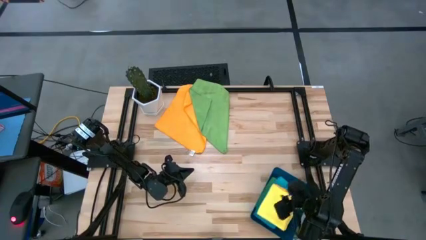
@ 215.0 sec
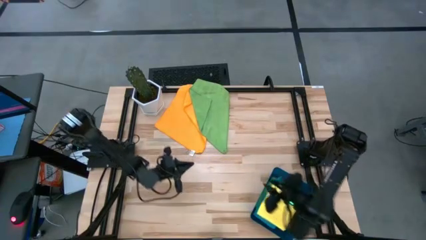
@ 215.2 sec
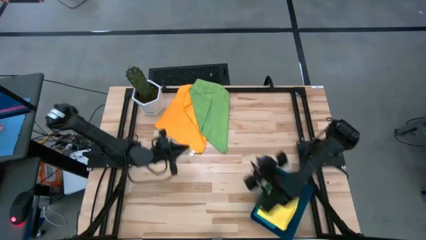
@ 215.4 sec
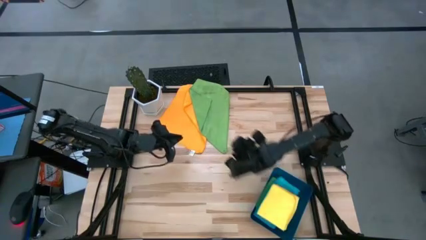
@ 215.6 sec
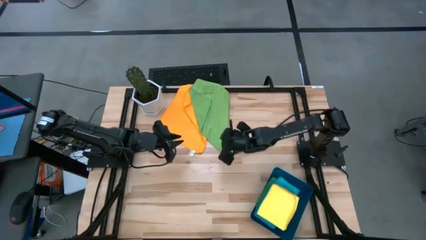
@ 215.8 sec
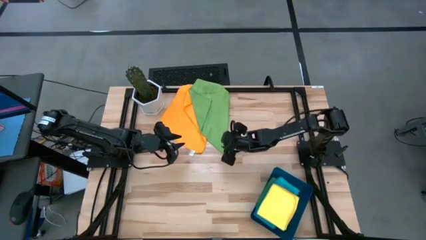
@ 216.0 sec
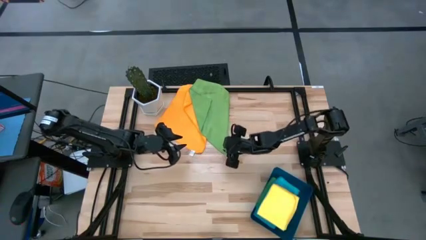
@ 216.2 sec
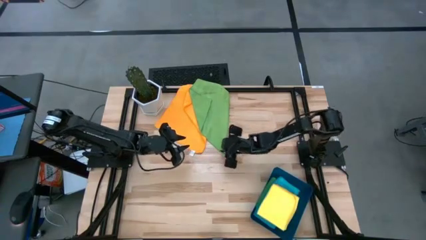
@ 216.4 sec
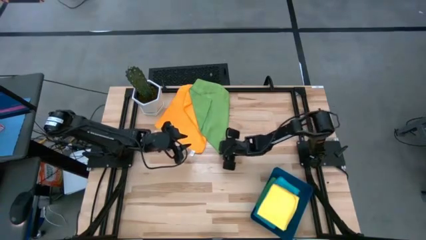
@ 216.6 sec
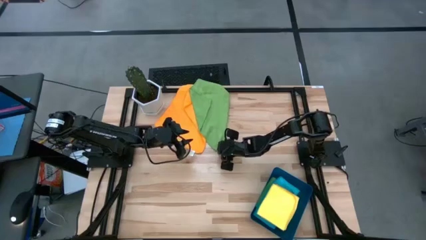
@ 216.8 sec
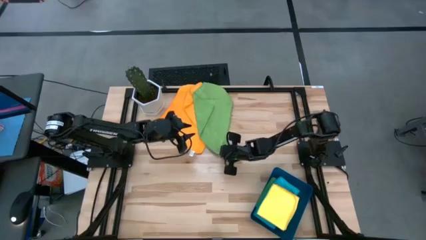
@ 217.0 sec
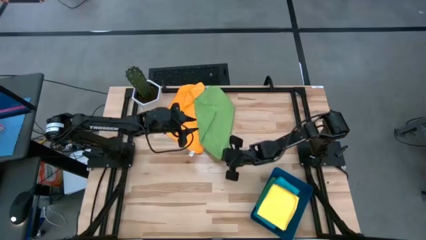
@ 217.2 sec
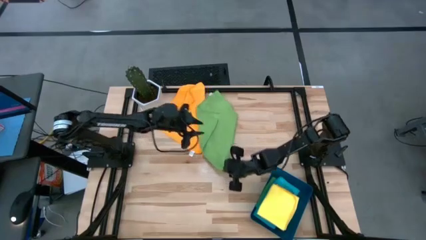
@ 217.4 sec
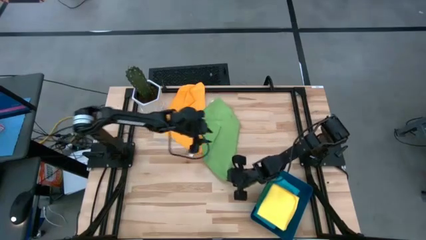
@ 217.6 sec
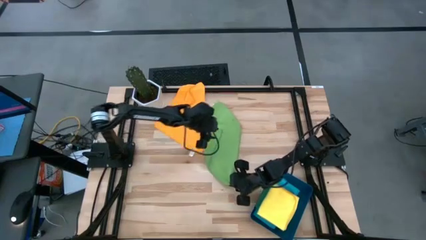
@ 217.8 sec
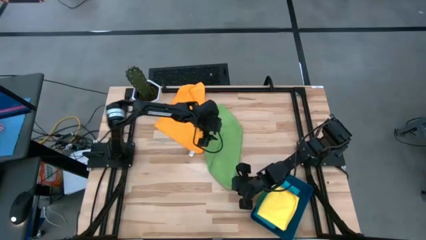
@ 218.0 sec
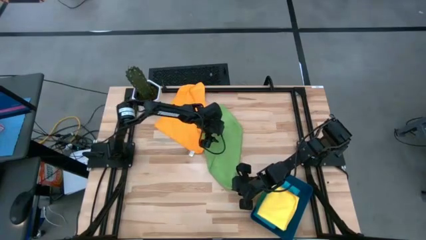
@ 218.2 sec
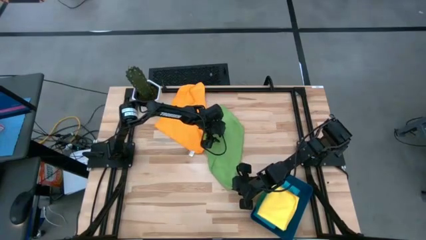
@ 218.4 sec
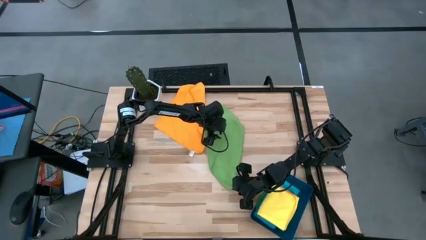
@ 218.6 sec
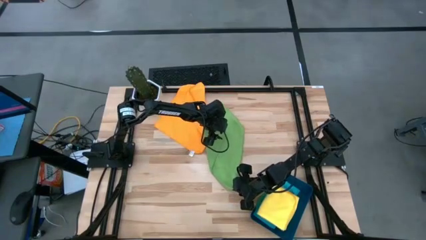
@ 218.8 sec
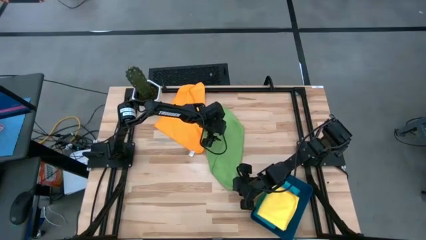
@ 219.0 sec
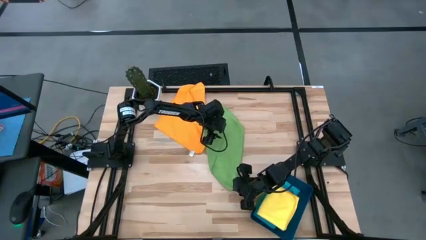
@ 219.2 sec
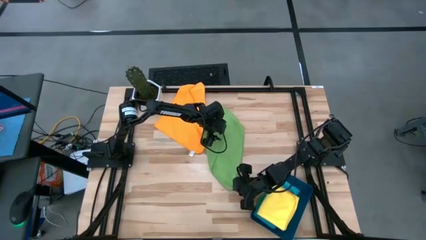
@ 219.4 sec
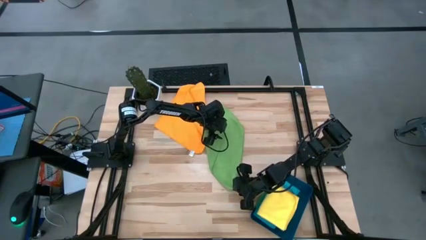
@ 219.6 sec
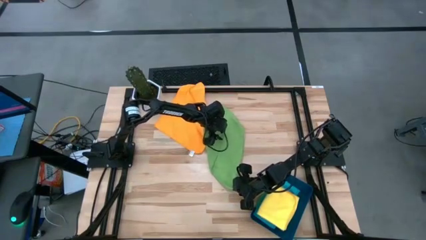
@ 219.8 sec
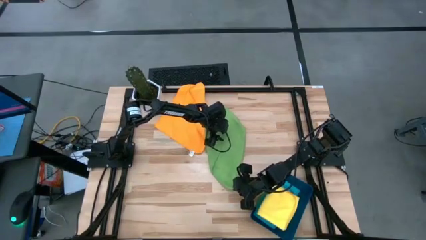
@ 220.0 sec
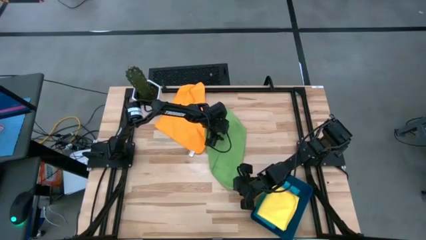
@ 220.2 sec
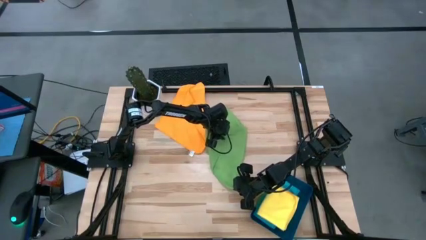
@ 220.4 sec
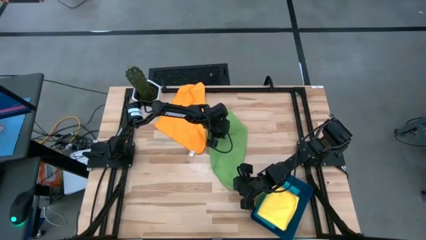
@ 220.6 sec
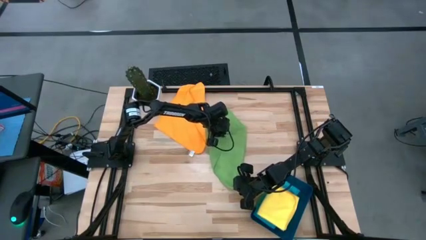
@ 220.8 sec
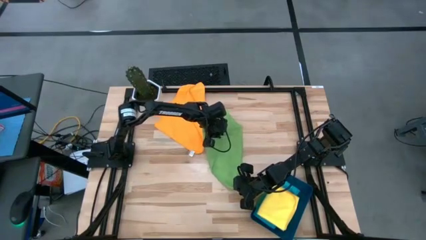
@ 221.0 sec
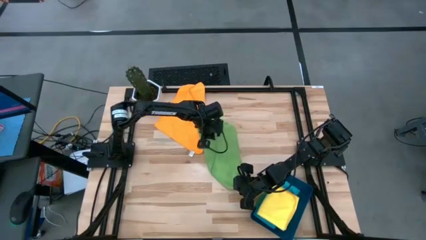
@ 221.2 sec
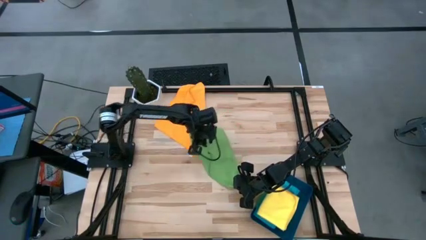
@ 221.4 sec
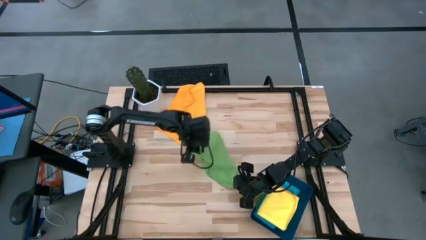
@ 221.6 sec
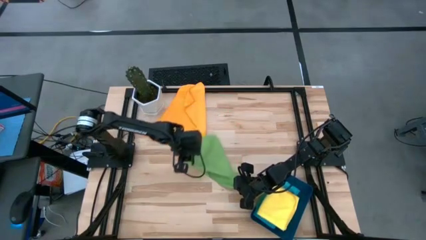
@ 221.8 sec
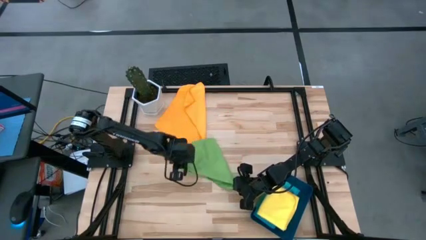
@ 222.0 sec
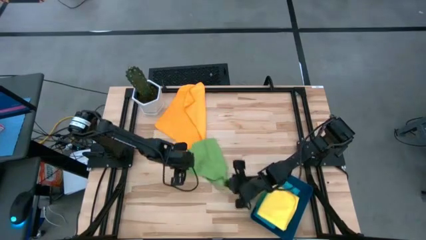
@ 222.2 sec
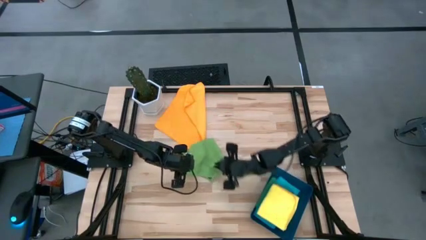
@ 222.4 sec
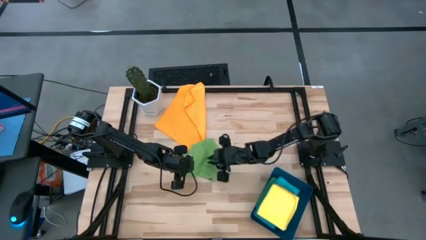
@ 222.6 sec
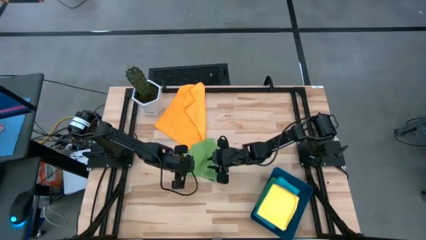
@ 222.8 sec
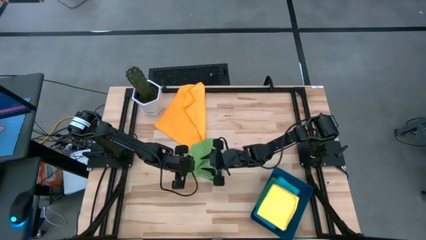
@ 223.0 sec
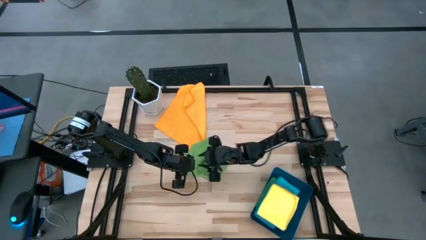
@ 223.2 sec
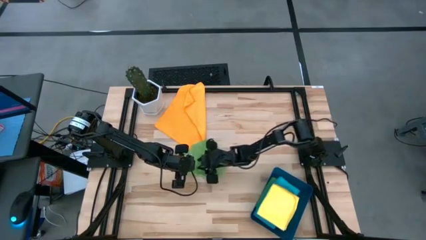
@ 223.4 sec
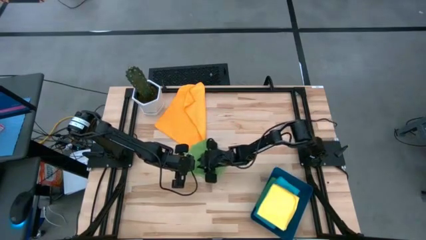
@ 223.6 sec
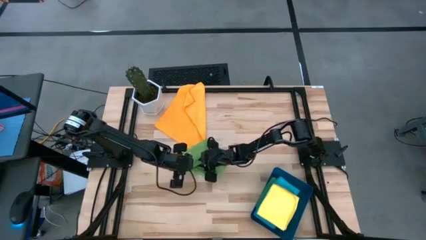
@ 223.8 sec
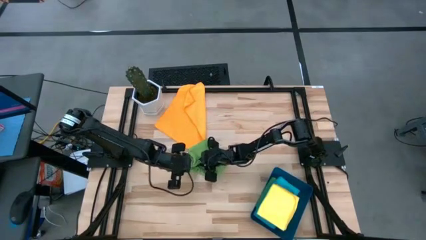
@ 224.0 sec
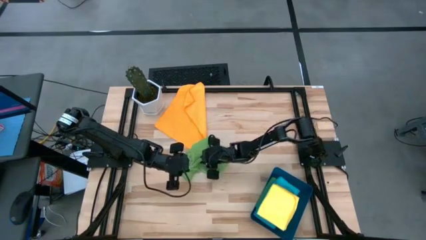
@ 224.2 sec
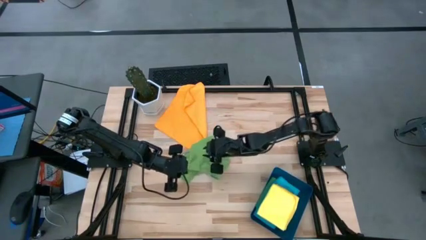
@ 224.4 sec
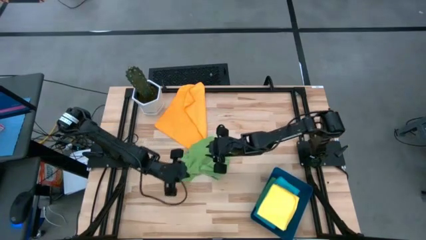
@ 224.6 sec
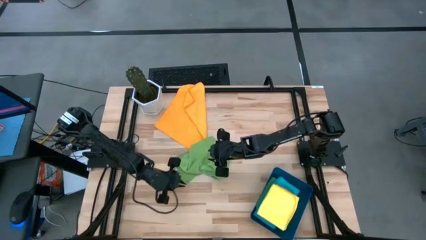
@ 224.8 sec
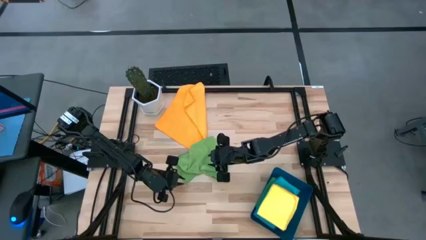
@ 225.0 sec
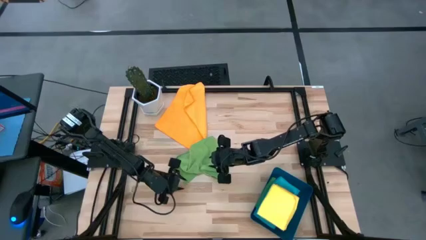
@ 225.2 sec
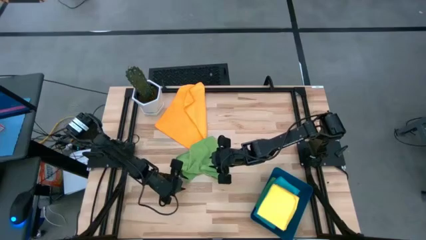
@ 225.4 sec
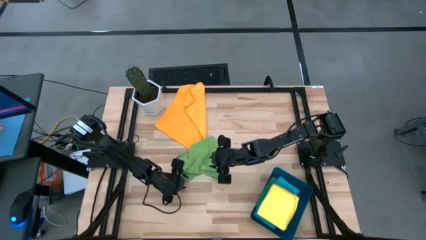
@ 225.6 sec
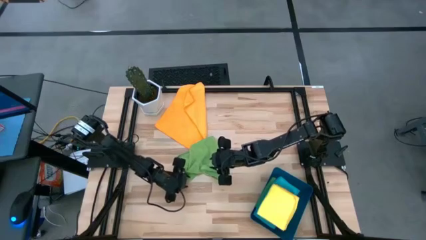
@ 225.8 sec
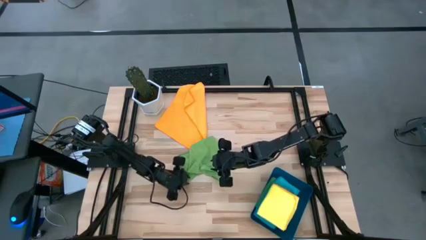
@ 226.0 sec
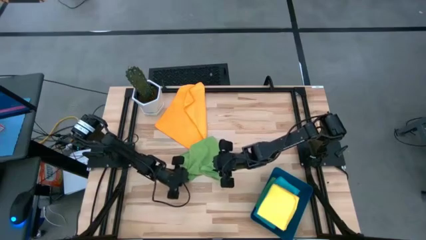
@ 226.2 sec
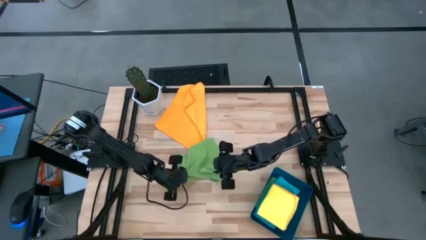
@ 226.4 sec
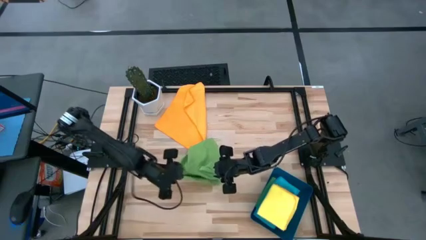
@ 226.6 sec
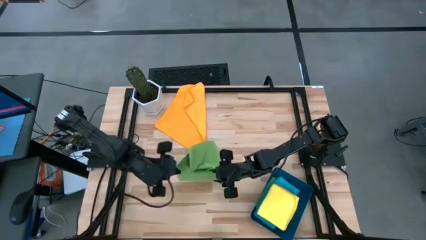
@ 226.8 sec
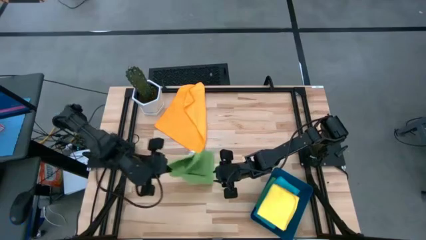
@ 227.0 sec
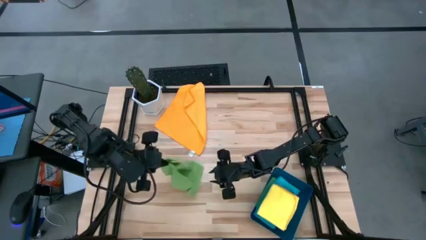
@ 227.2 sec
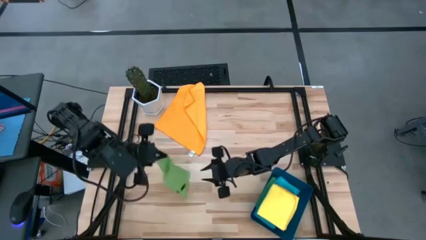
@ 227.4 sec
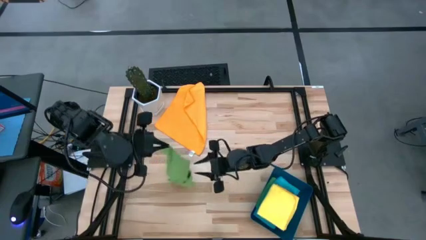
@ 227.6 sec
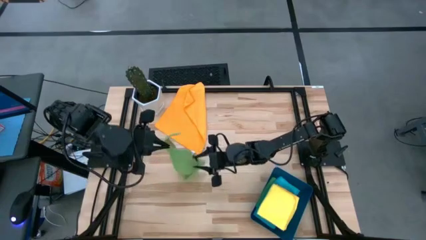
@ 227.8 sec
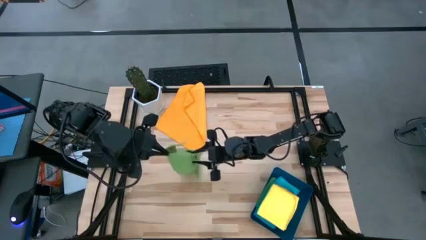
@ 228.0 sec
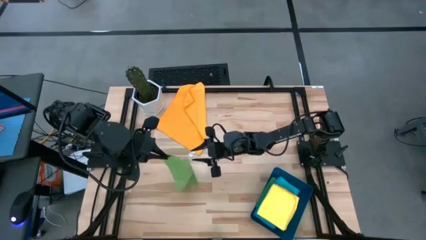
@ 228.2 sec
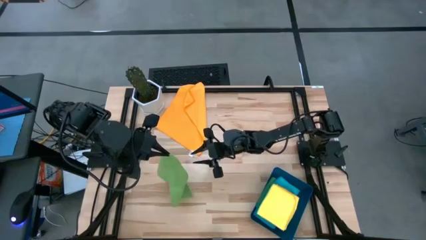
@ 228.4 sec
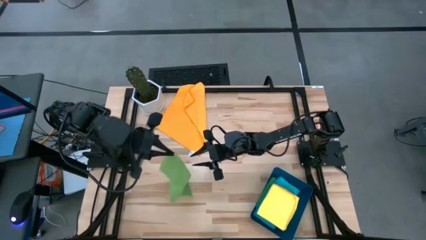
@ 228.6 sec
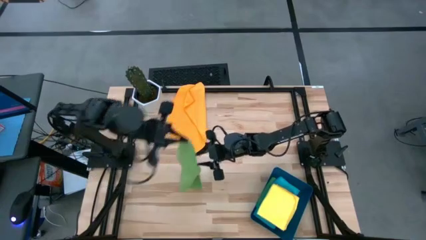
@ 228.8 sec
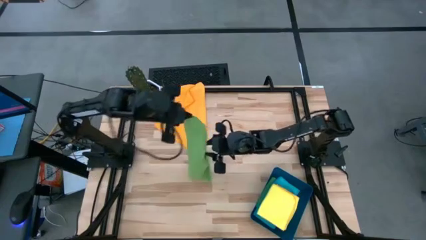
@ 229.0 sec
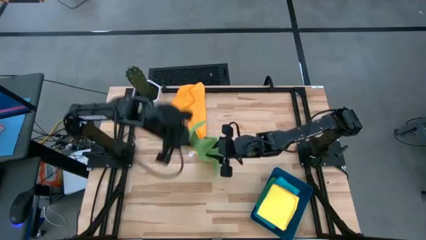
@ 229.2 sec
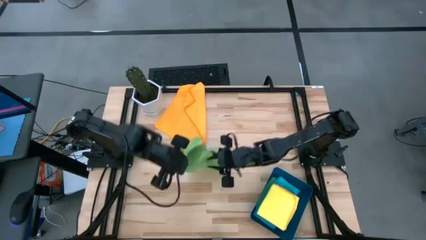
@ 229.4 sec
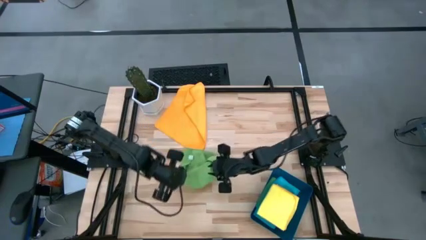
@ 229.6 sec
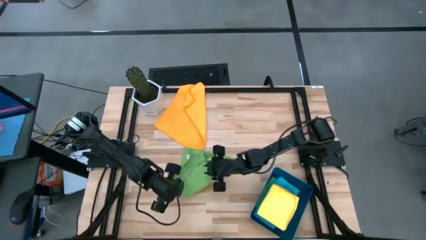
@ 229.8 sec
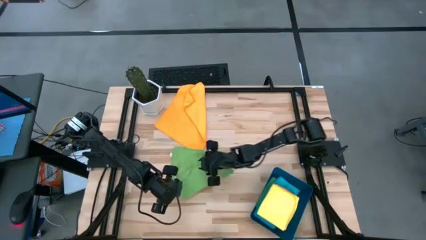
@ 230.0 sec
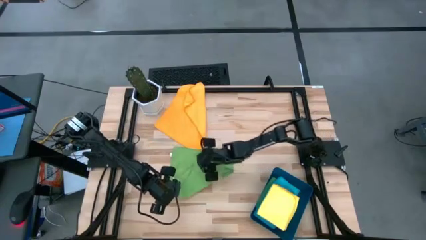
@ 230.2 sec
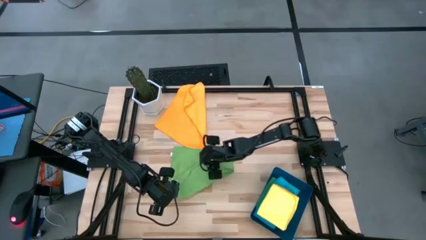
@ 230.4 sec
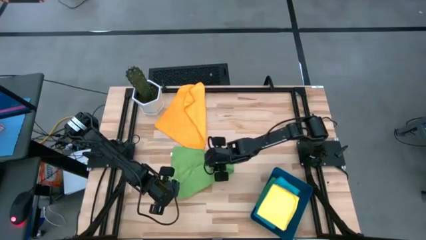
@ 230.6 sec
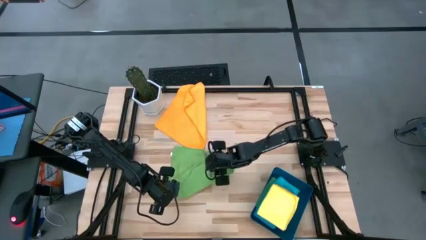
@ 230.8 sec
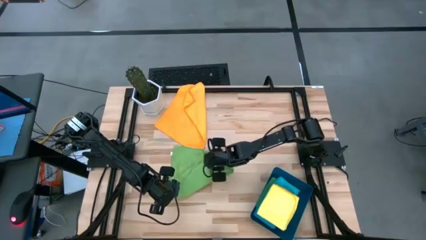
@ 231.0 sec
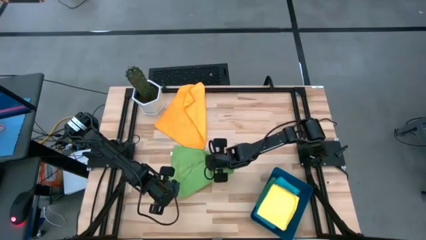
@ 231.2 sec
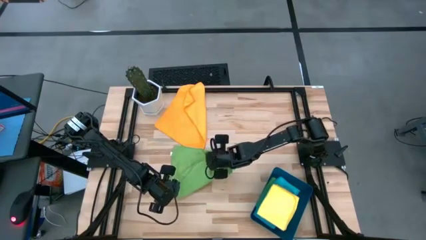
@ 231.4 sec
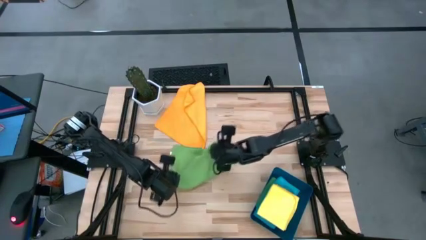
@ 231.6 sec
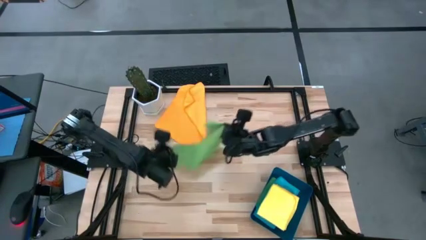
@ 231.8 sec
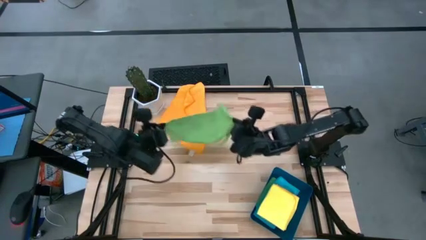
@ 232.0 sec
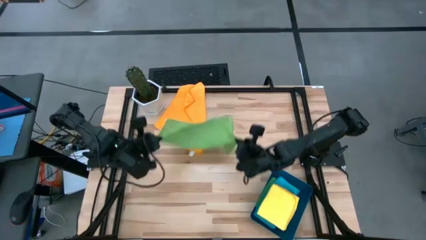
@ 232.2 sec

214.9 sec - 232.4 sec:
Task: Fold microfiber towels
Fold the green microfiber towel
